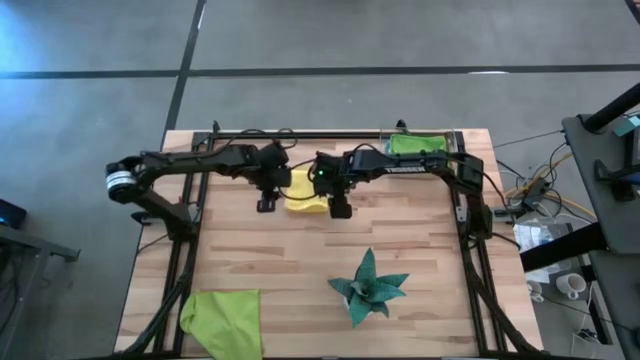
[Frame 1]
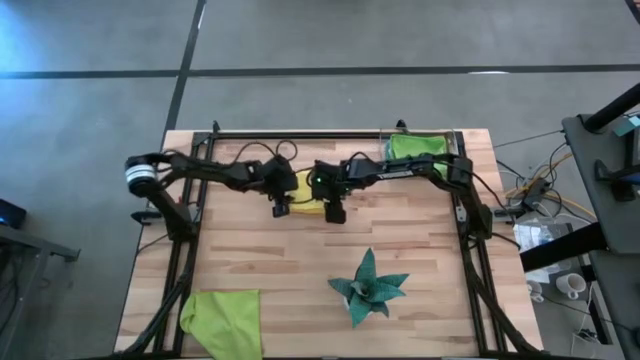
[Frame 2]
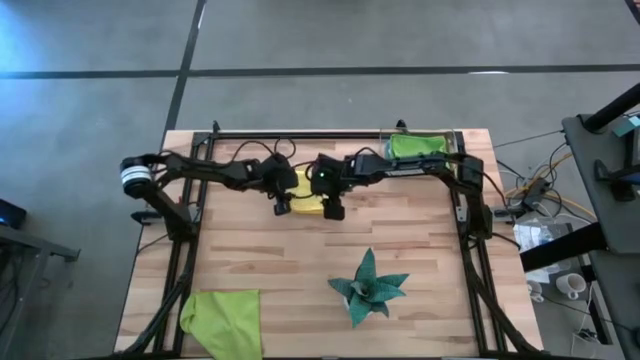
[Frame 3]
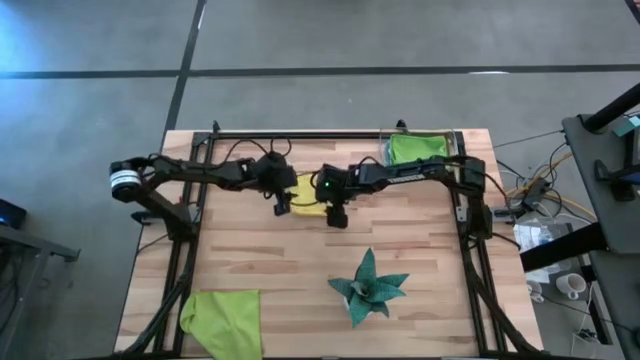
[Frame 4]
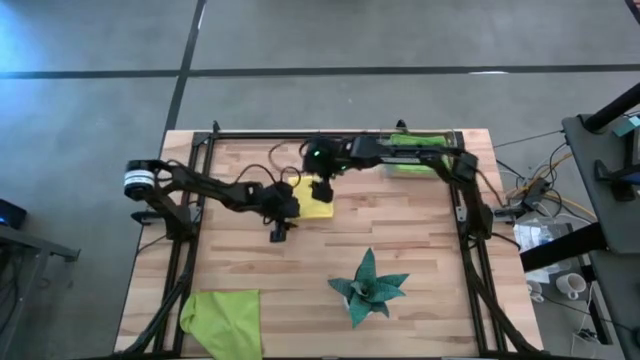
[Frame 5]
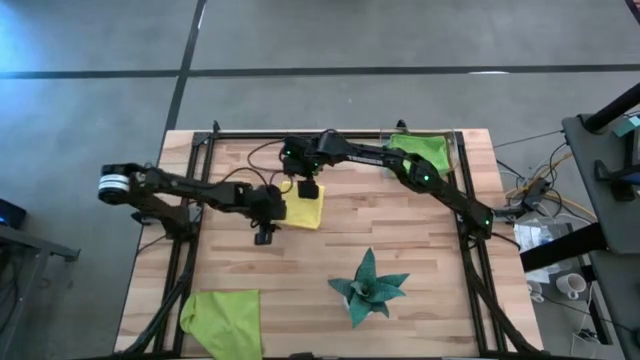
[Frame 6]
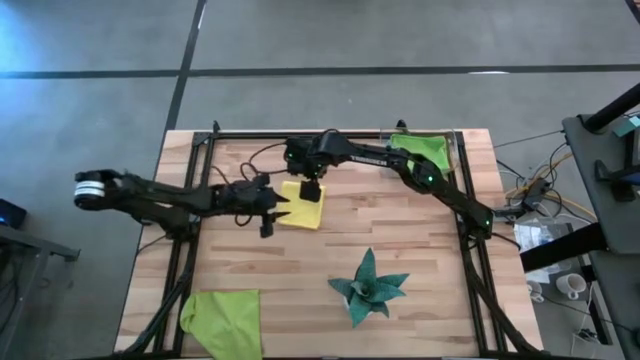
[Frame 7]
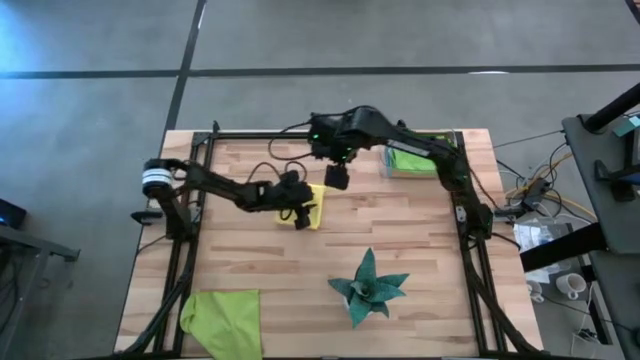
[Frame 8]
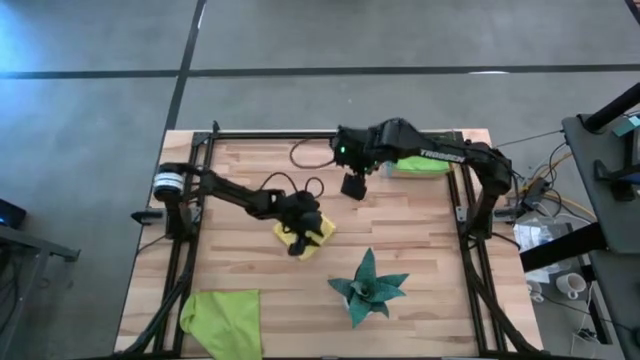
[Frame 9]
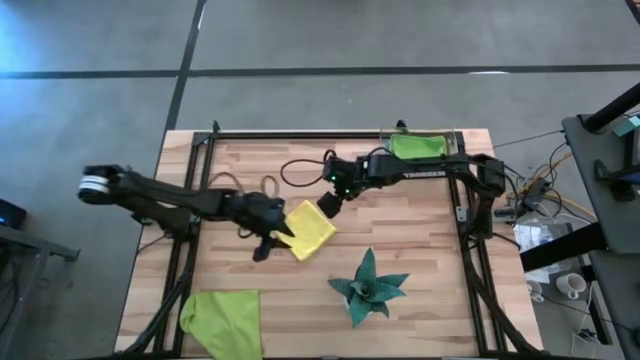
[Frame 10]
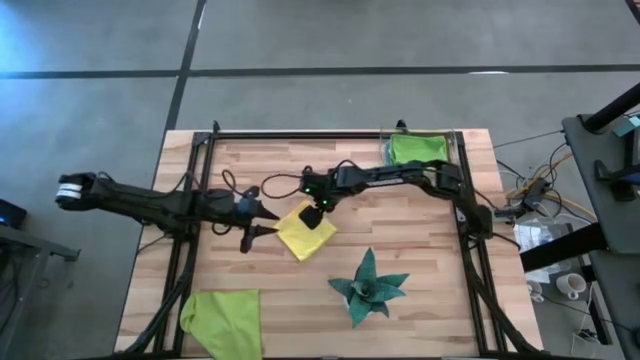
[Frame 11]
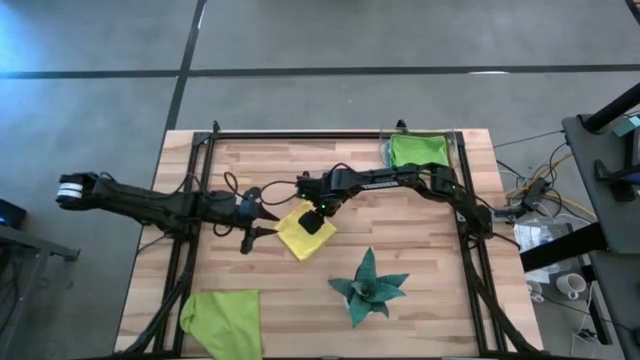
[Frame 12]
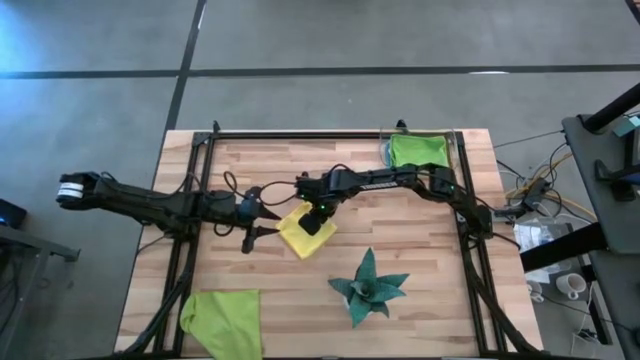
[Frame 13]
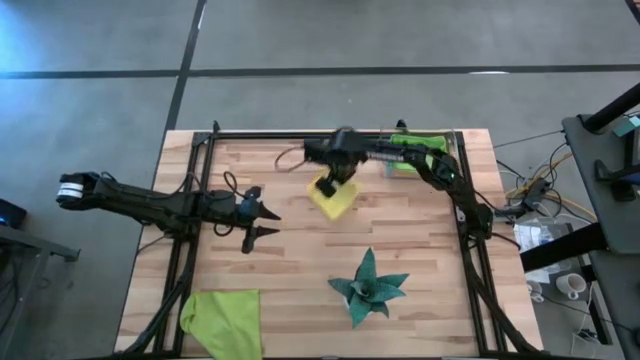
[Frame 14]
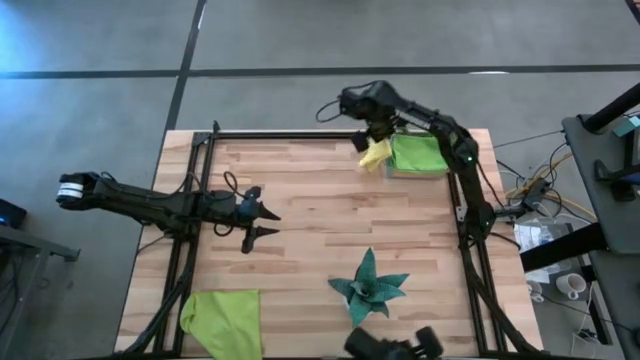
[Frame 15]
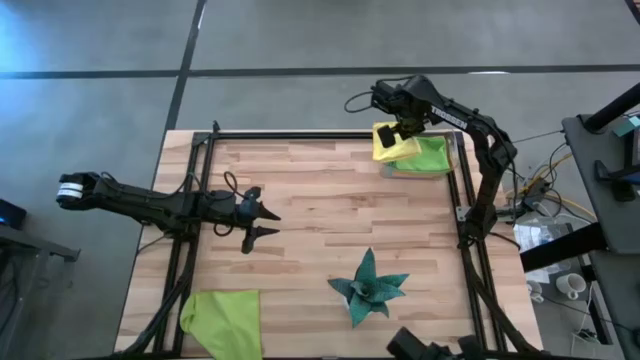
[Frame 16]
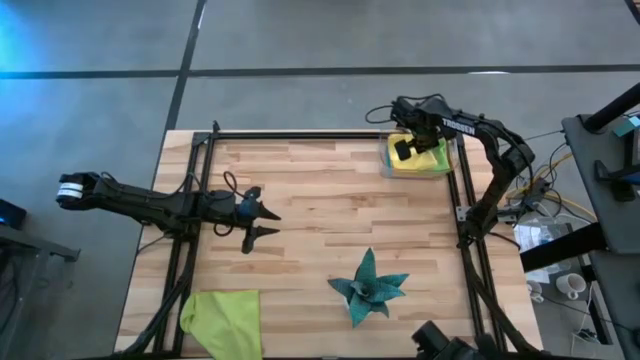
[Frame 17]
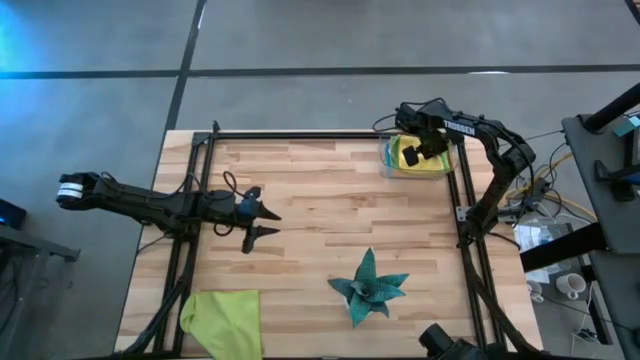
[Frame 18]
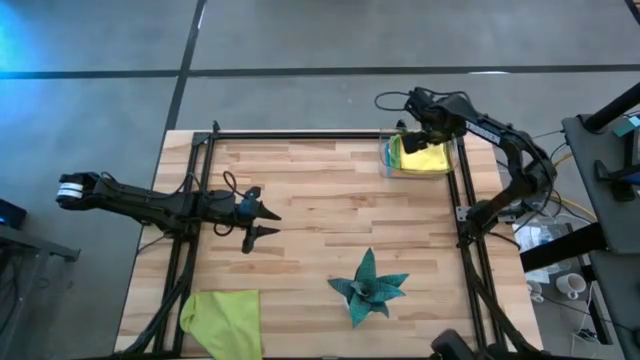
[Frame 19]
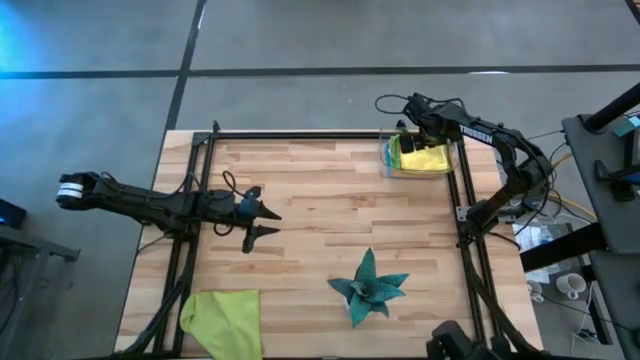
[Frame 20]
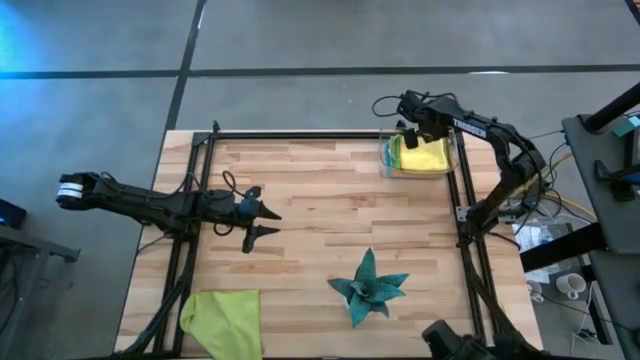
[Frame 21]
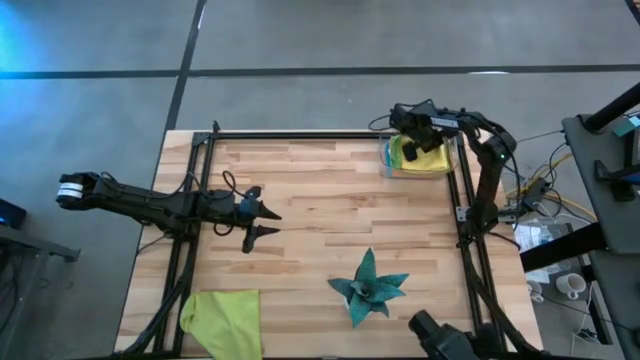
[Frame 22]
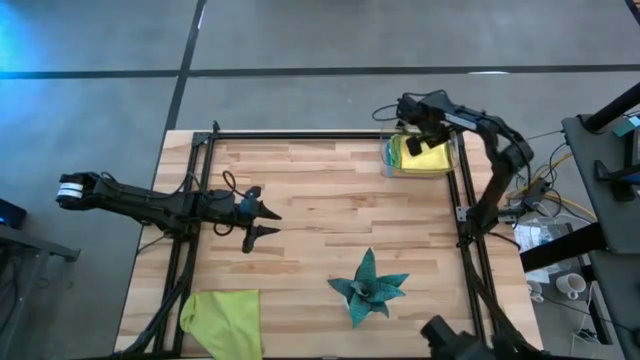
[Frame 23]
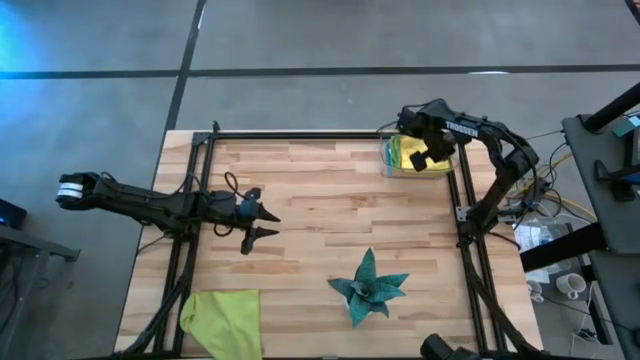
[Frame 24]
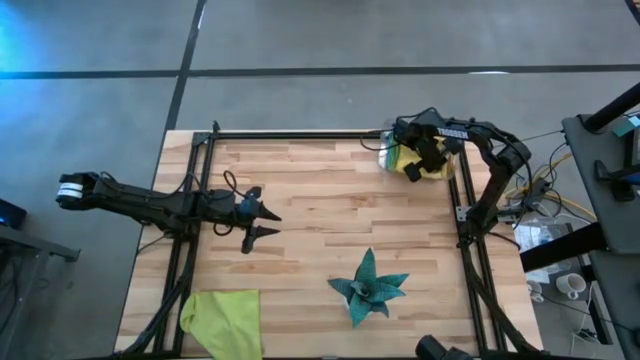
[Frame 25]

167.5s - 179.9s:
Task: Fold microfiber towels
Put the yellow microfiber cloth into the transparent bin

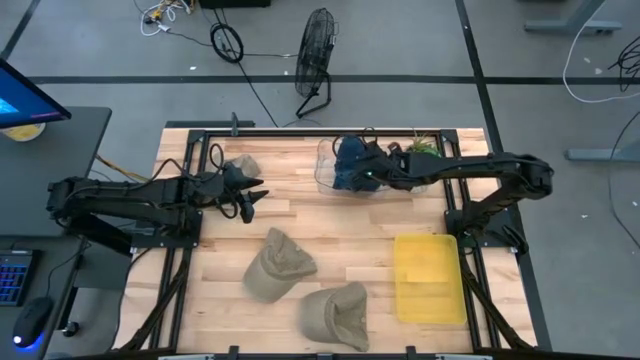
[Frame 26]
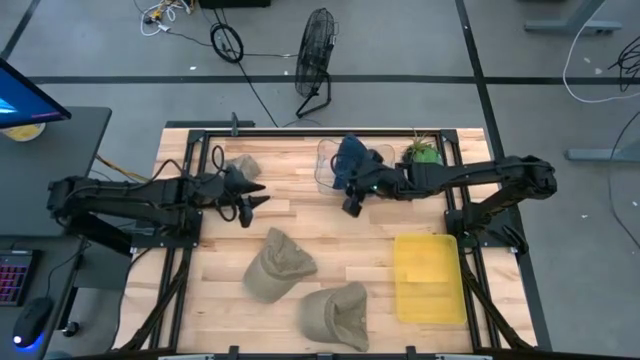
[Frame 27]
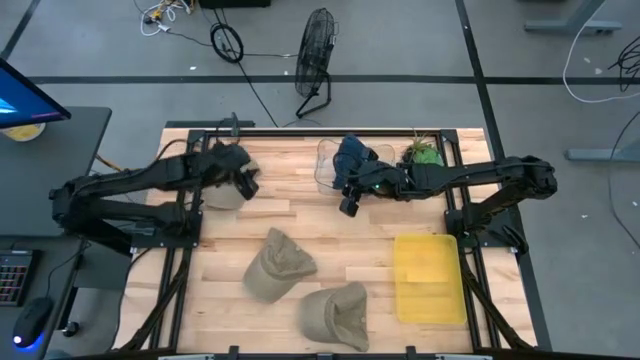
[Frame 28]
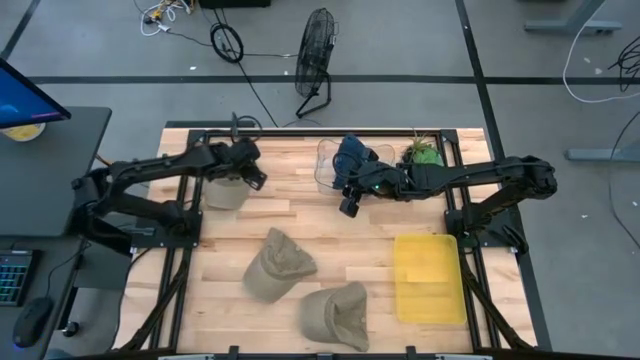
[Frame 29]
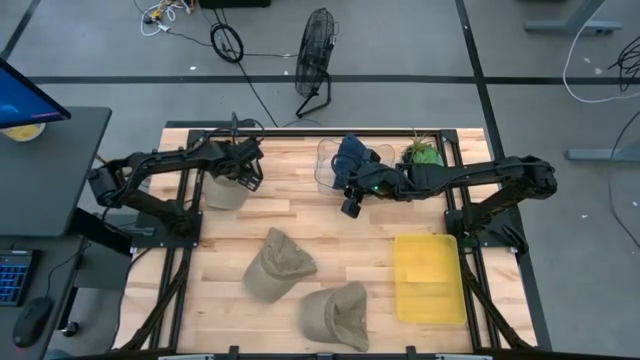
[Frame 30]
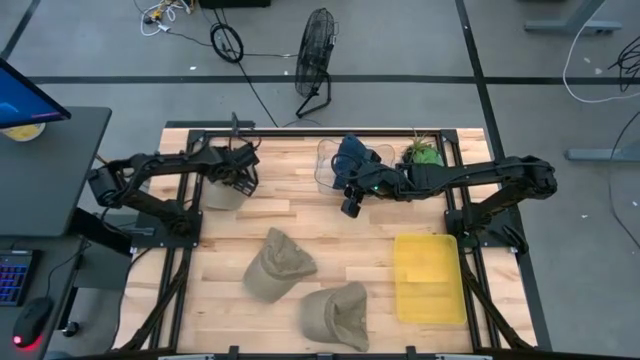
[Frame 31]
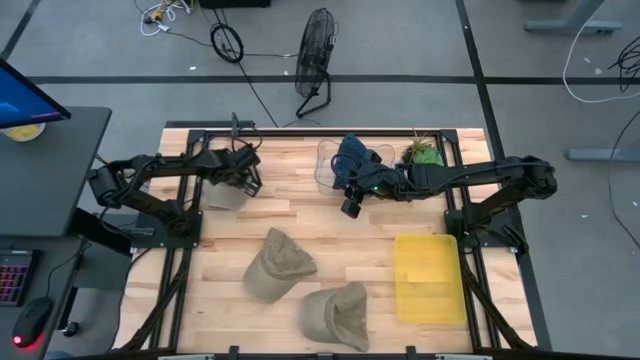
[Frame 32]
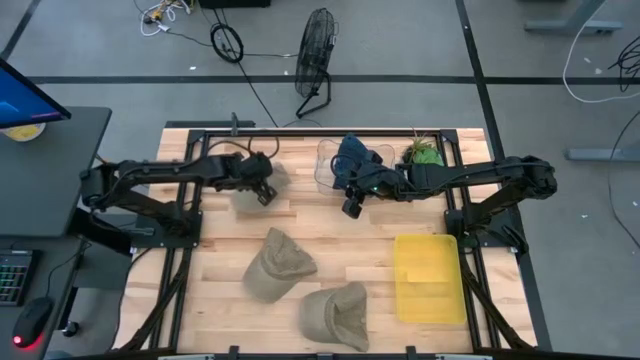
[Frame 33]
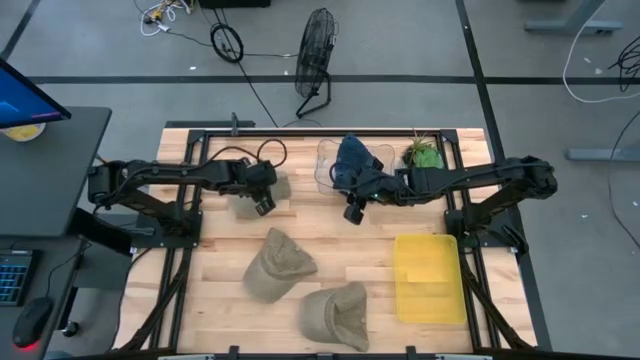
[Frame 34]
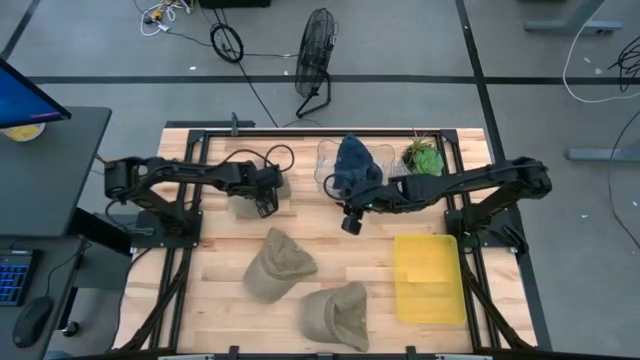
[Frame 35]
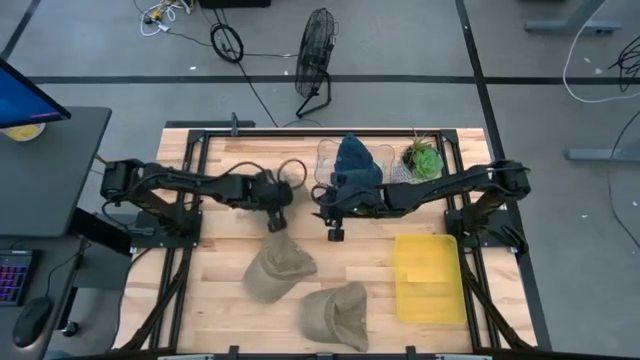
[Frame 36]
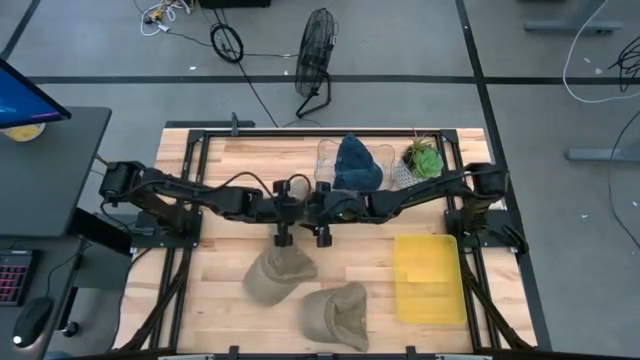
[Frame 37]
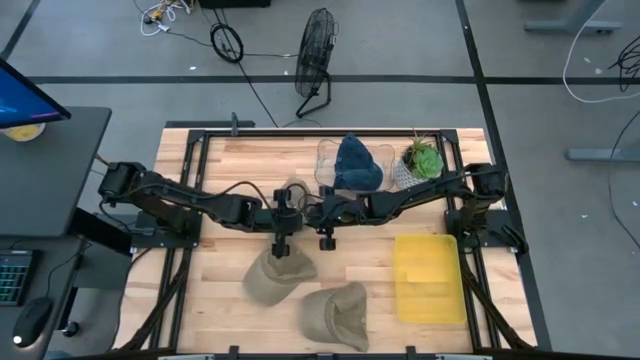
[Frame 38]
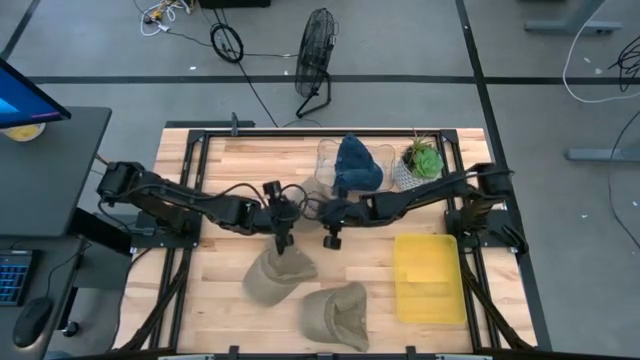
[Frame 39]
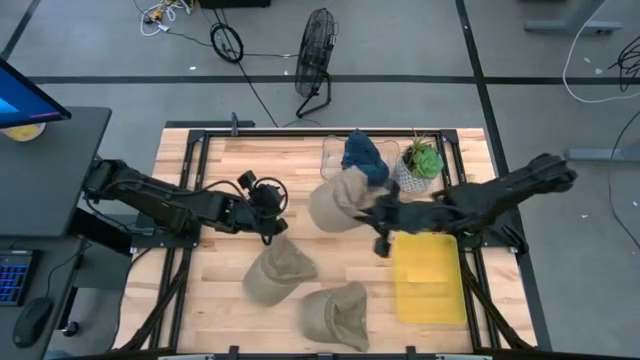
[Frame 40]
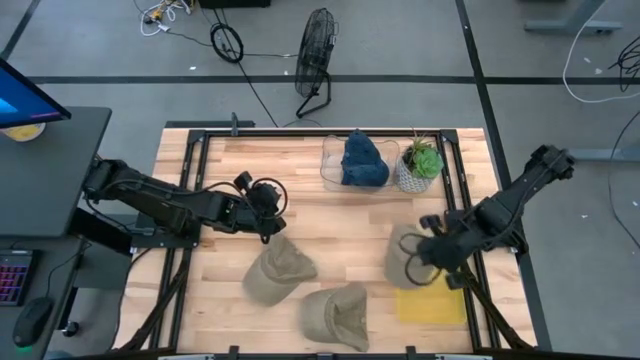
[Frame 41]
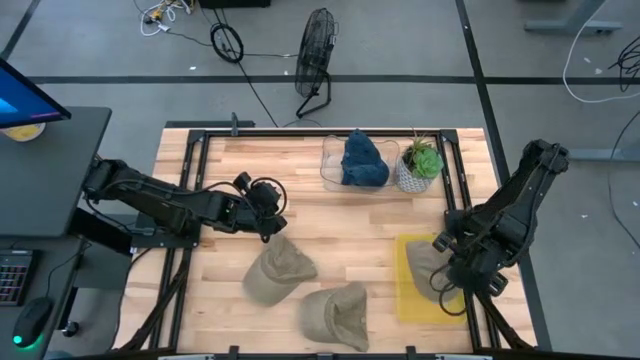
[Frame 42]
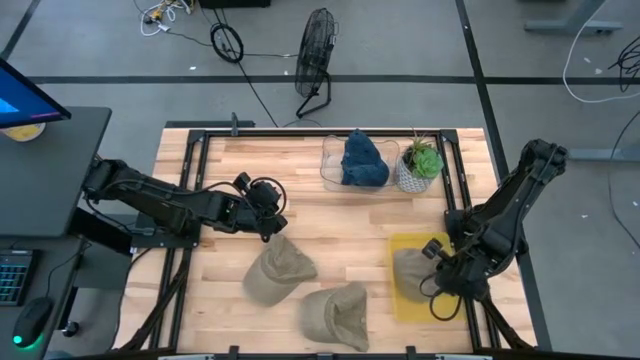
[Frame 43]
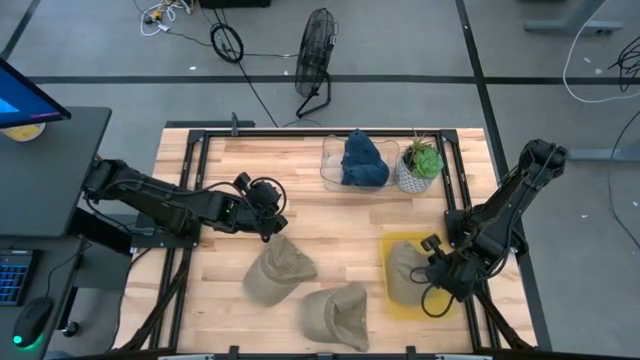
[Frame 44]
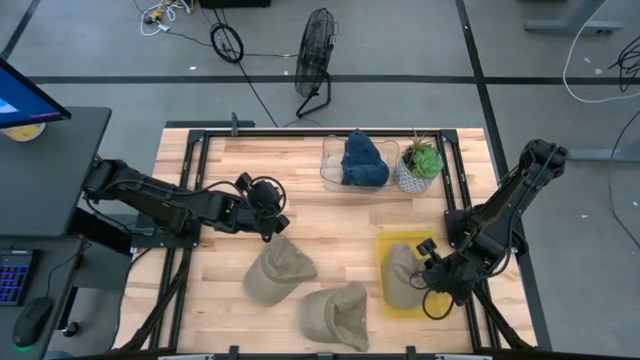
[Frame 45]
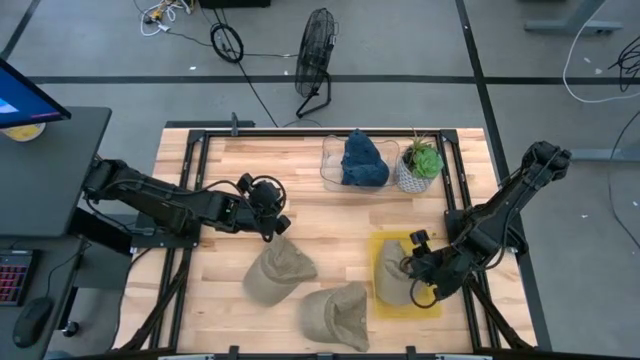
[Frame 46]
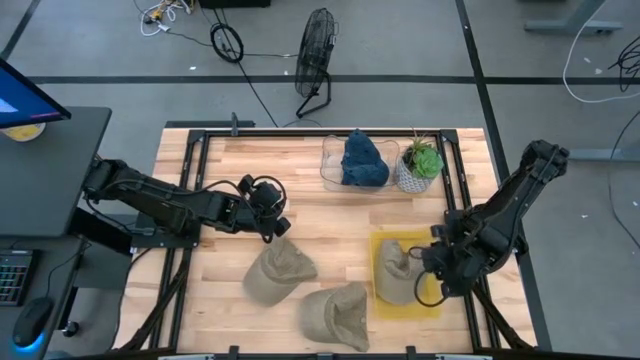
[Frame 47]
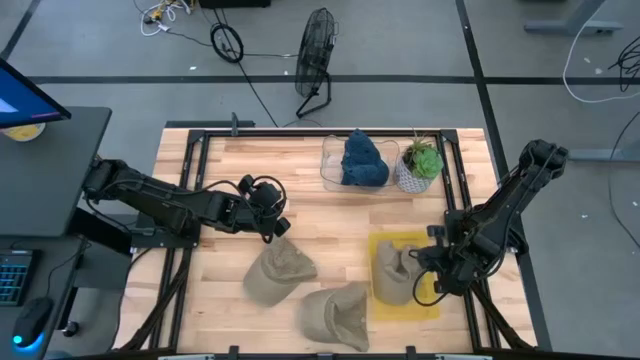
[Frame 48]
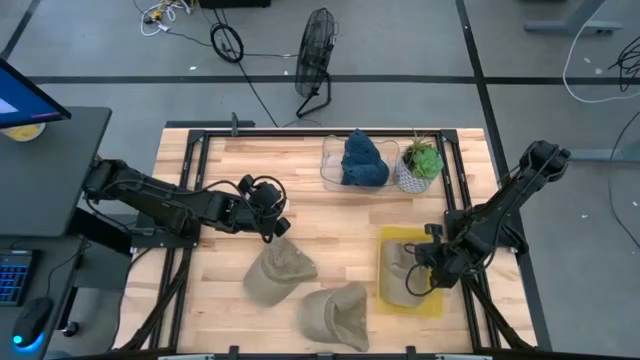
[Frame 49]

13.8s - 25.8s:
Task: Pick & Place hat
Put the top brown cap into the yellow bin
